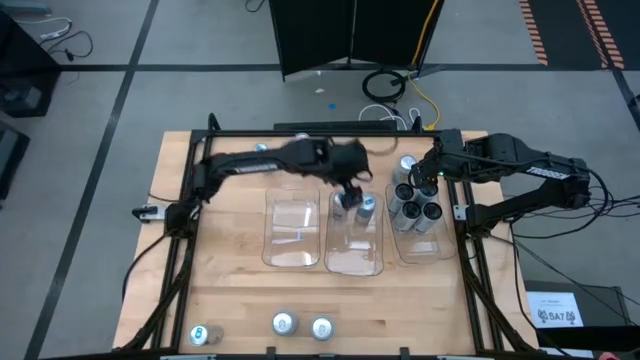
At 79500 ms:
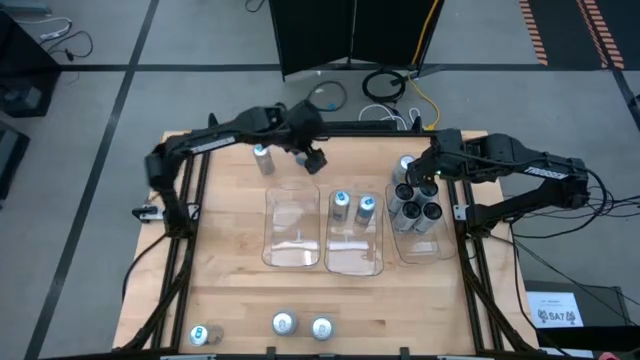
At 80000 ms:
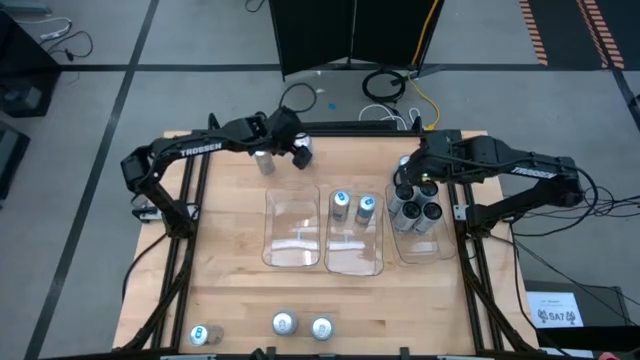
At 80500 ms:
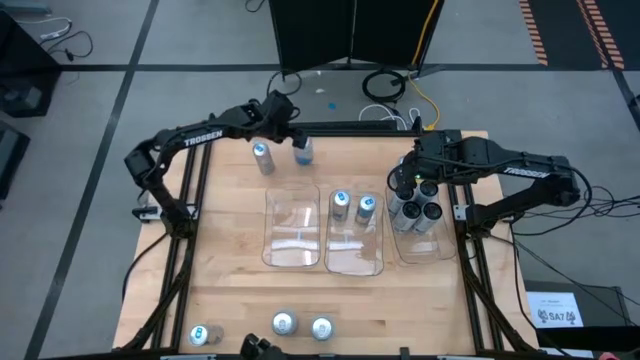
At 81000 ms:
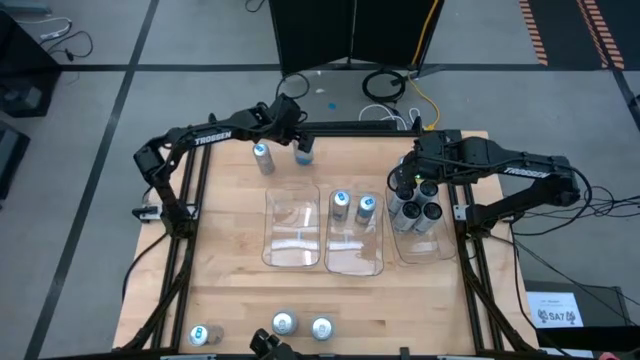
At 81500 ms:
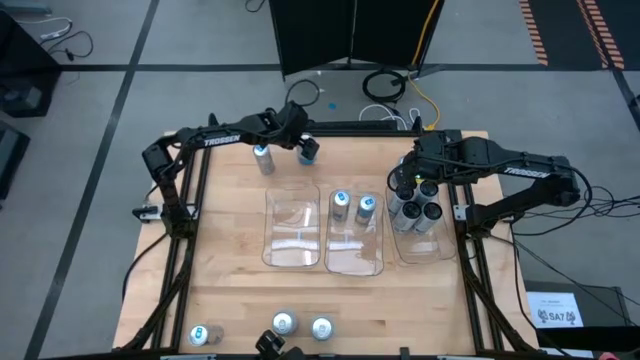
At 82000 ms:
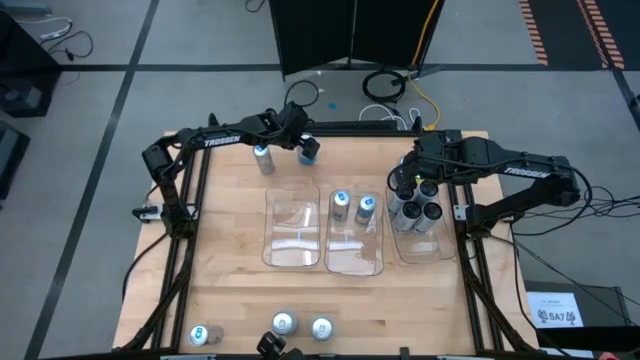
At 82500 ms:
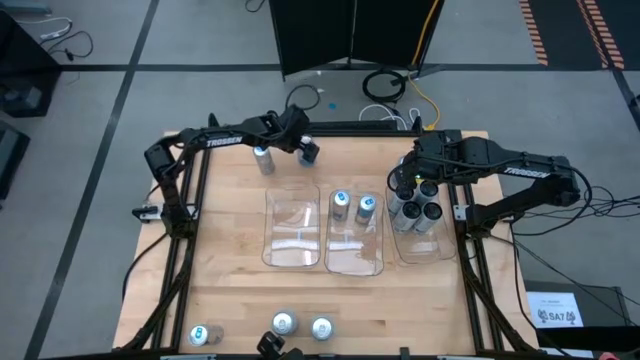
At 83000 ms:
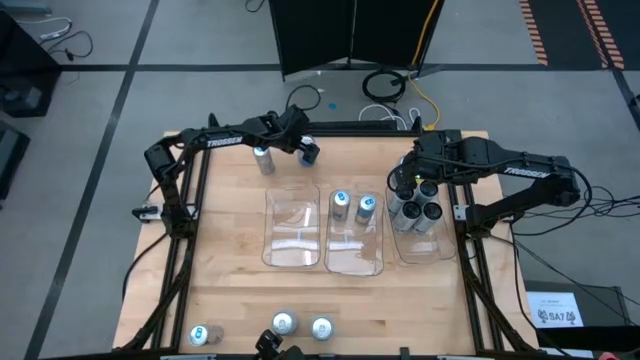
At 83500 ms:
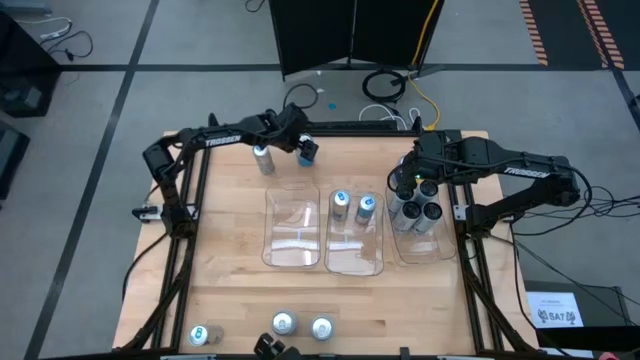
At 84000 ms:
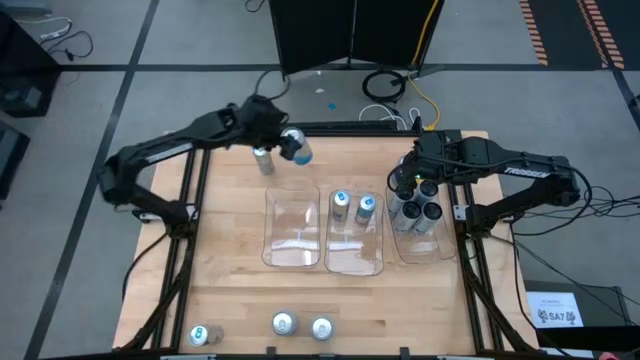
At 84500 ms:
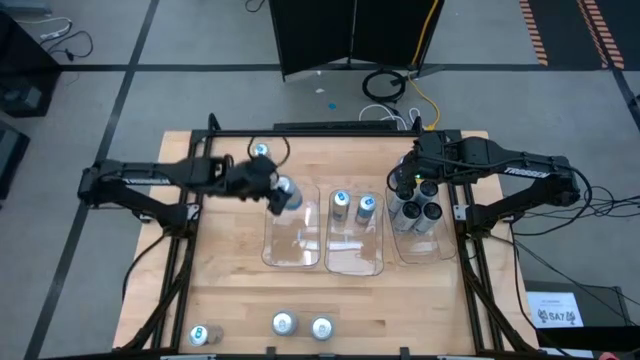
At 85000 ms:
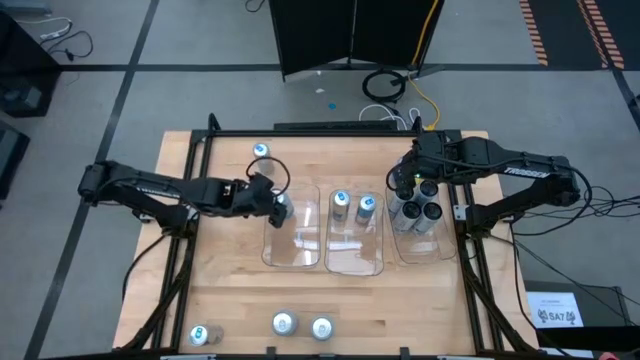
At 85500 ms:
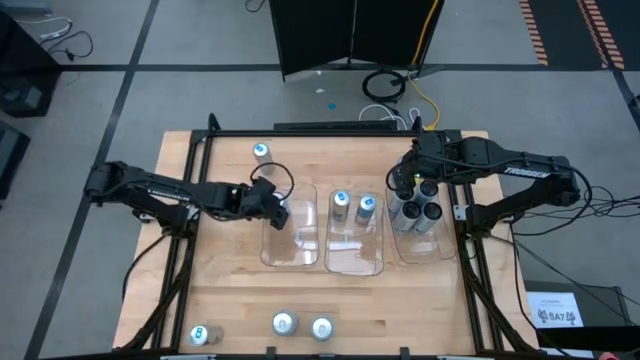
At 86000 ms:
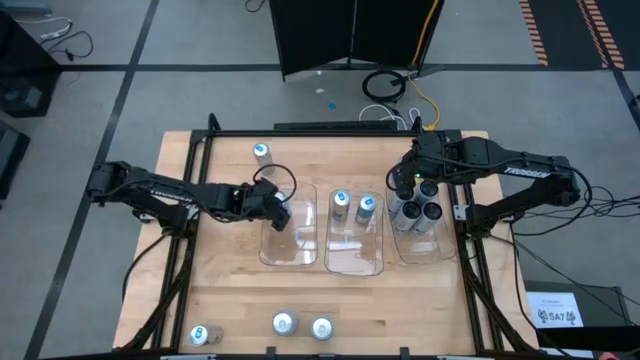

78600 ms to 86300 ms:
Task: Sort soda cans
Put the top left blue-white soda can into the left transparent bin

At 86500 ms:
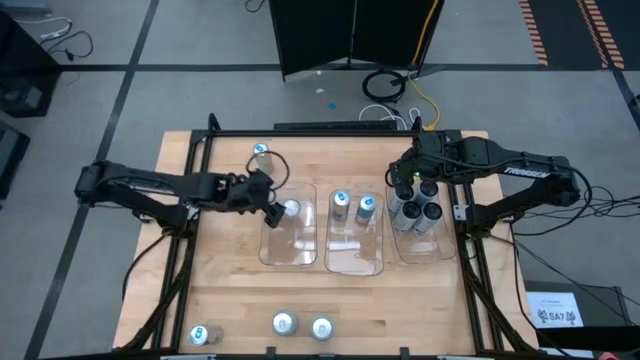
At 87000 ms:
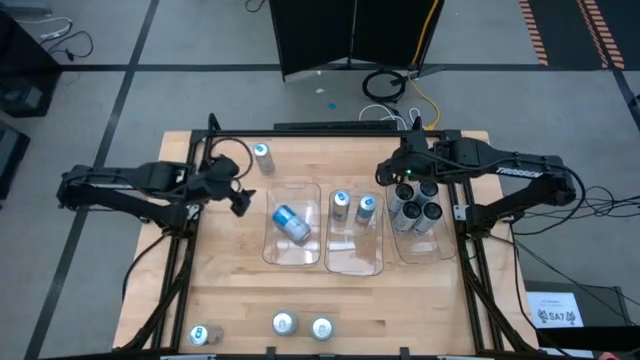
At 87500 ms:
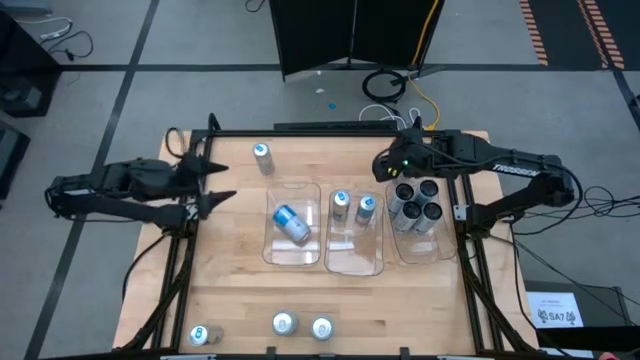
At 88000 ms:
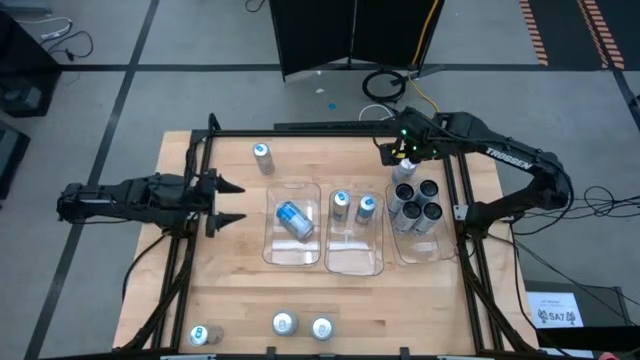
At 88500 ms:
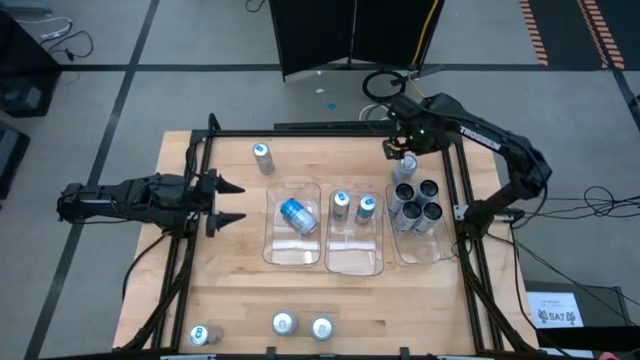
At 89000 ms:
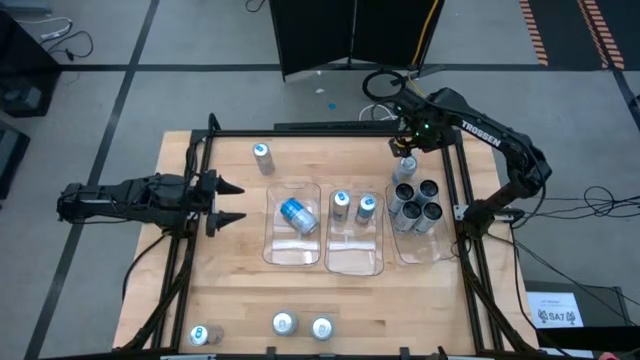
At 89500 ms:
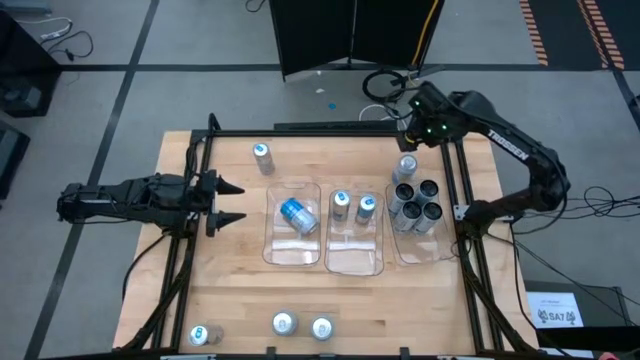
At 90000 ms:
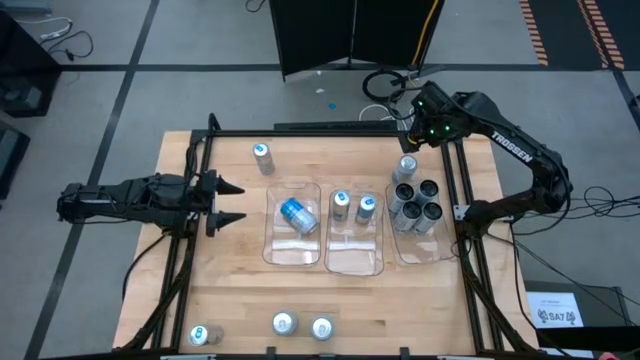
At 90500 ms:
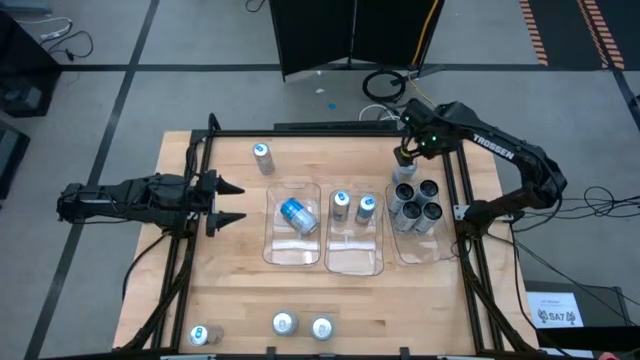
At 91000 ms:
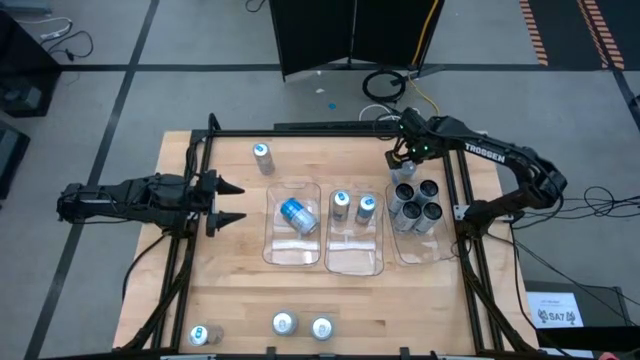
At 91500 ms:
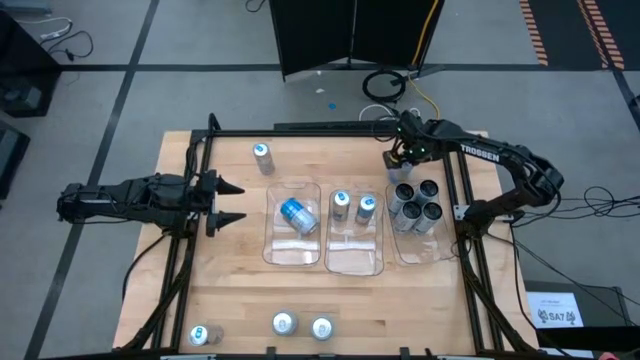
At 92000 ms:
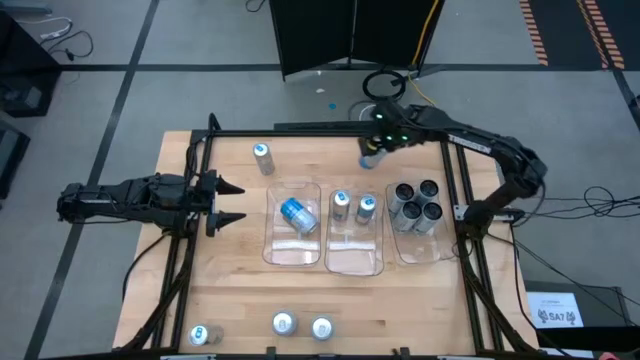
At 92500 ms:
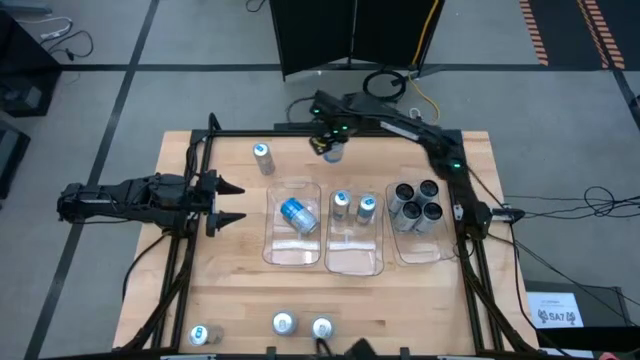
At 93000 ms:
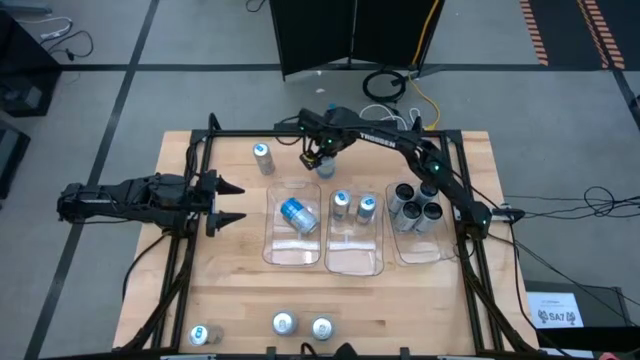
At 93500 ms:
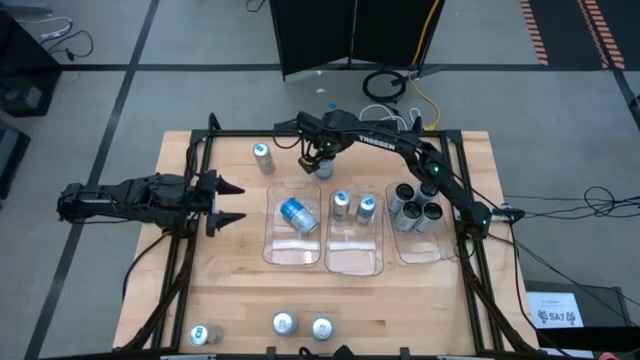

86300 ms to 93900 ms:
Move the top blue-white soda can to the top center of the table

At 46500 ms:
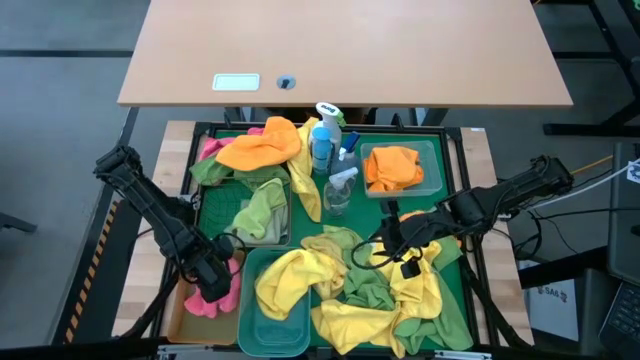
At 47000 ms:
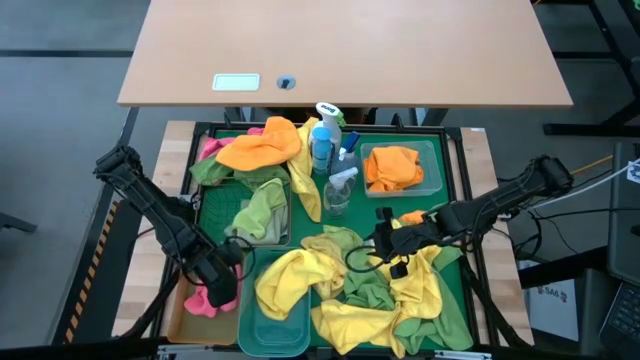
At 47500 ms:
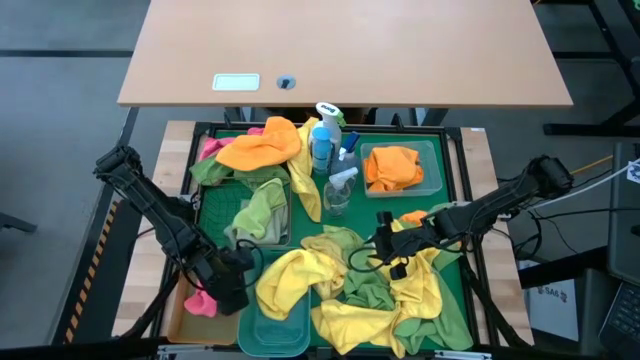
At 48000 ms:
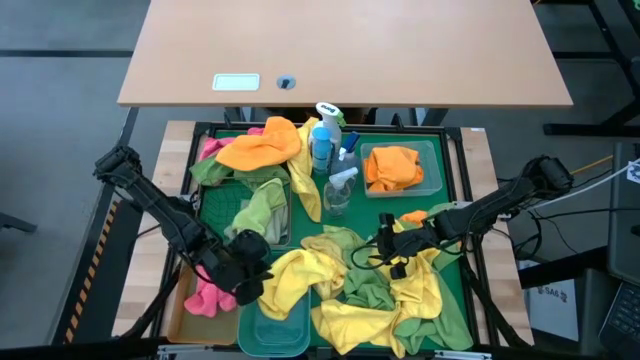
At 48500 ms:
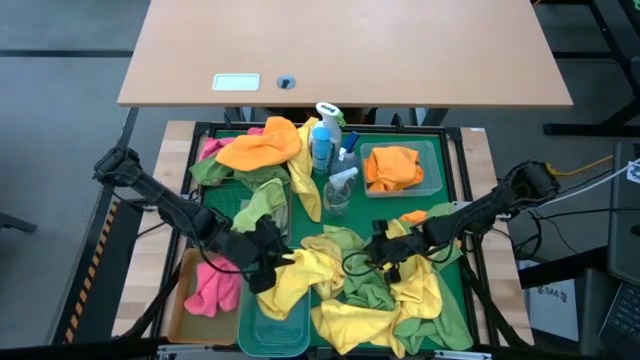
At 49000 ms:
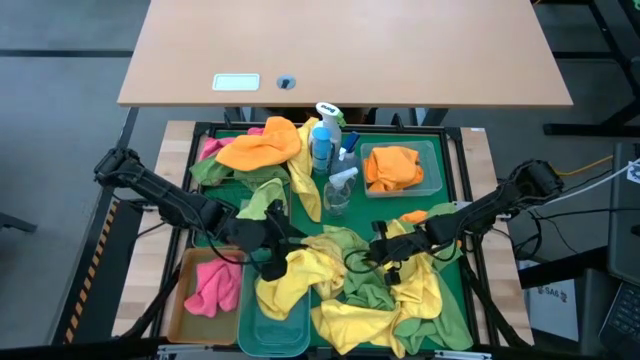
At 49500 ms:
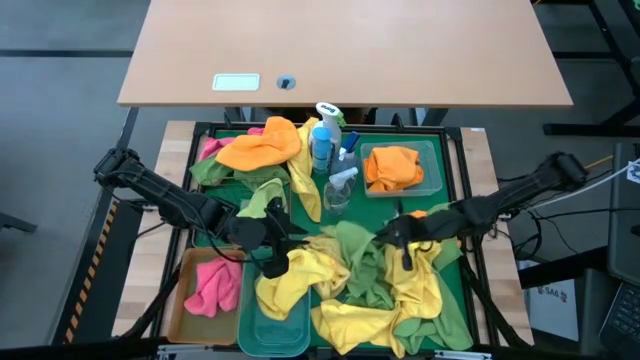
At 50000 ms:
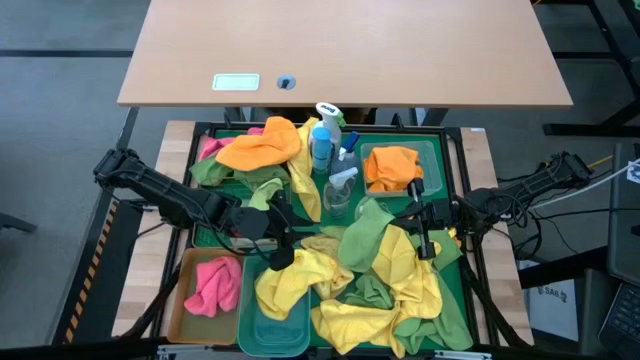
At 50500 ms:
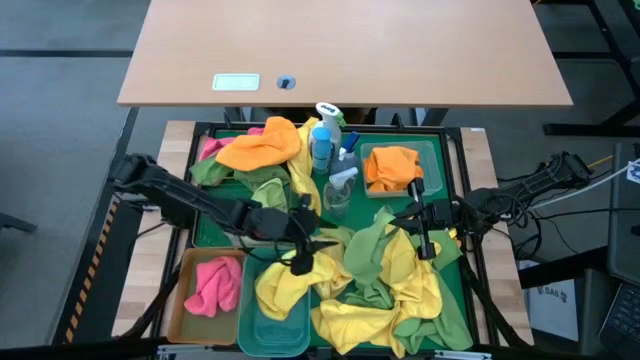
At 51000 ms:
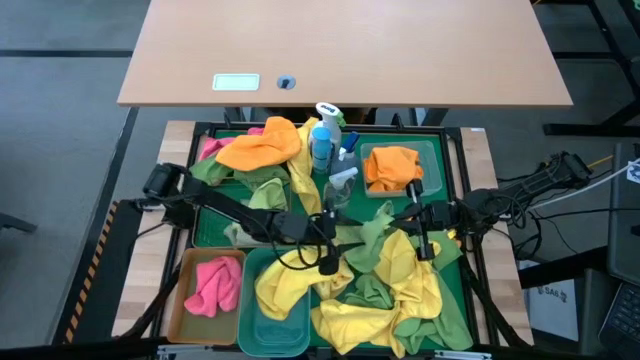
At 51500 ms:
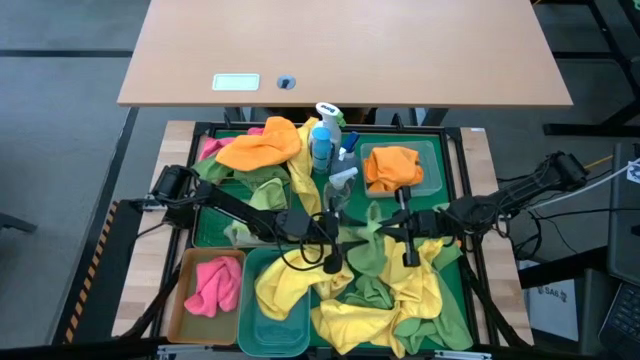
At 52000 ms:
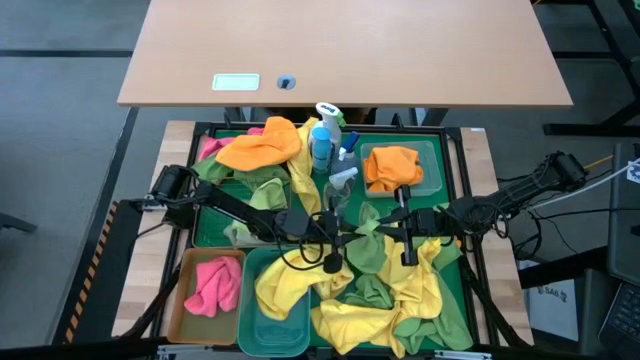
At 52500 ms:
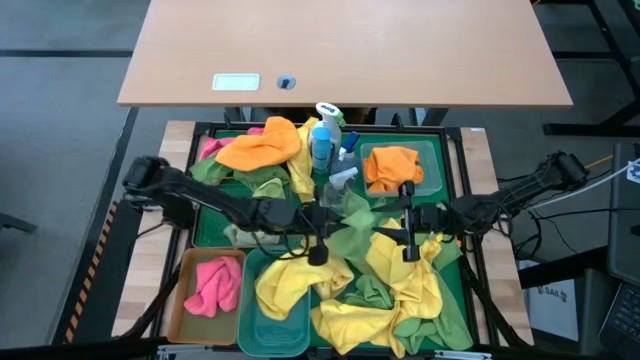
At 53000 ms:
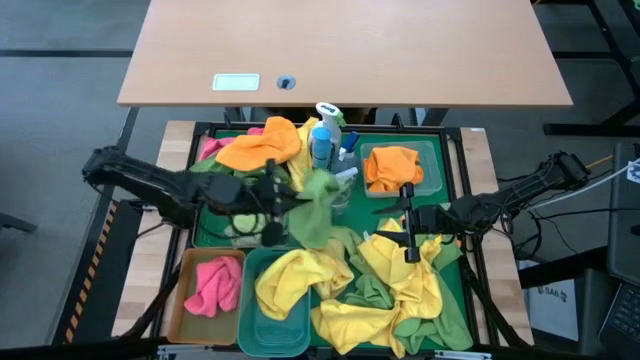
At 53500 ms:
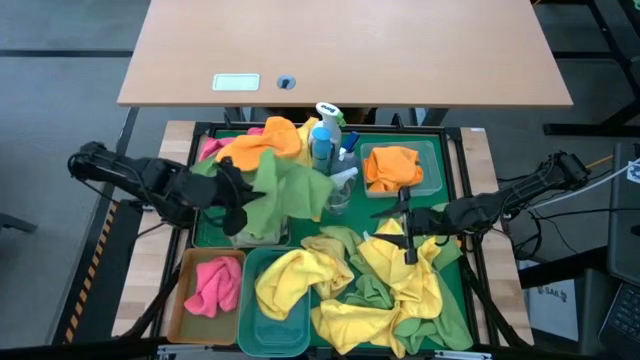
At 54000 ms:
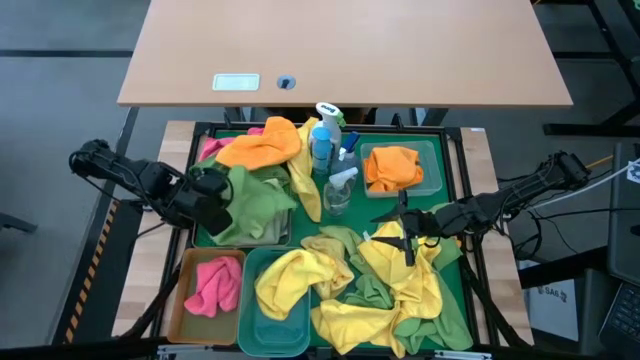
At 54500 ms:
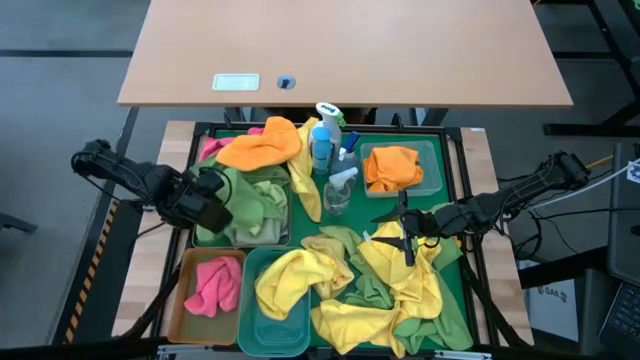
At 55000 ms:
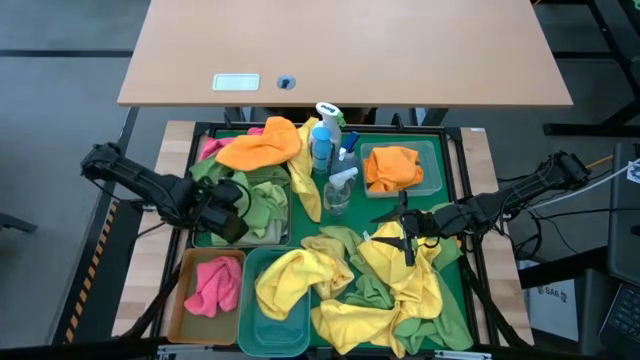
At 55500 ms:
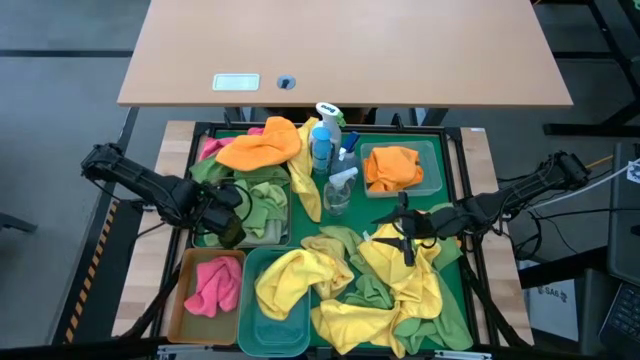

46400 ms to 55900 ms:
Task: Sort microfiber towel by color & place in baskets
Put the green towel into the wire basket
